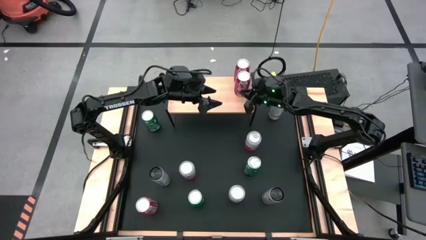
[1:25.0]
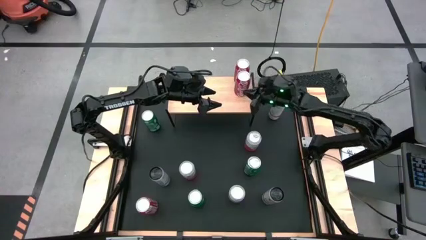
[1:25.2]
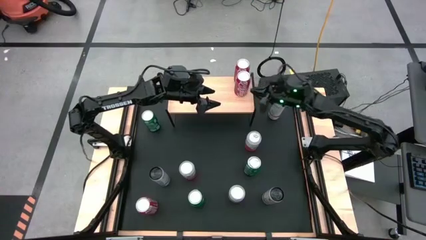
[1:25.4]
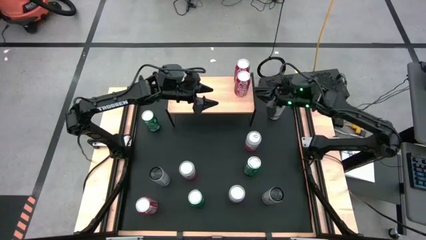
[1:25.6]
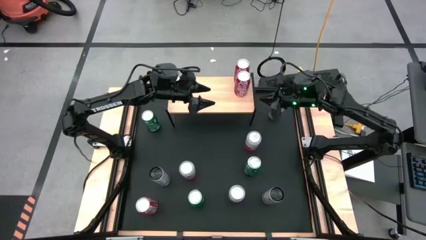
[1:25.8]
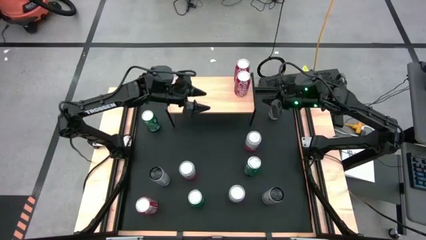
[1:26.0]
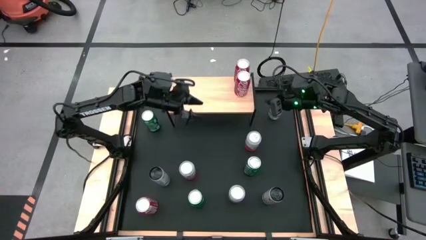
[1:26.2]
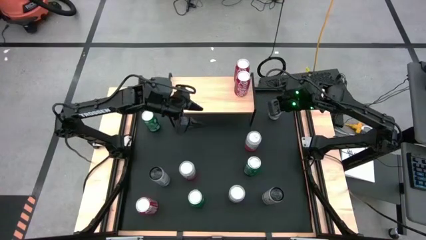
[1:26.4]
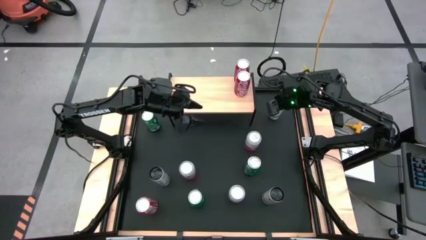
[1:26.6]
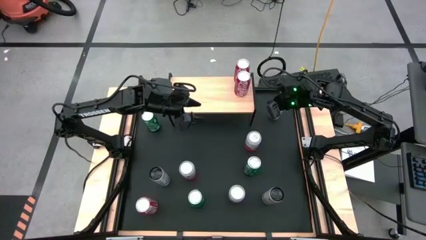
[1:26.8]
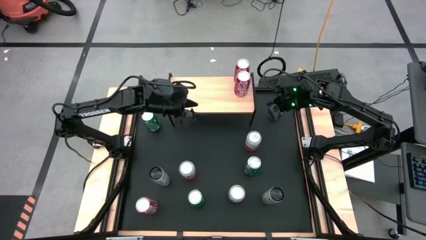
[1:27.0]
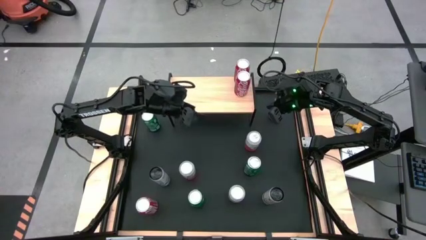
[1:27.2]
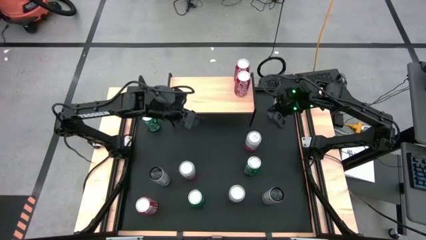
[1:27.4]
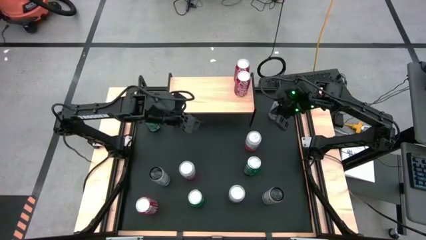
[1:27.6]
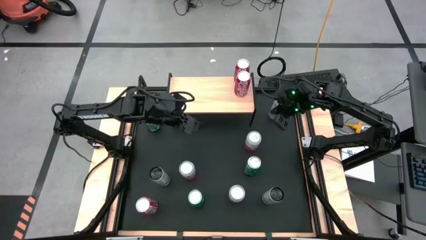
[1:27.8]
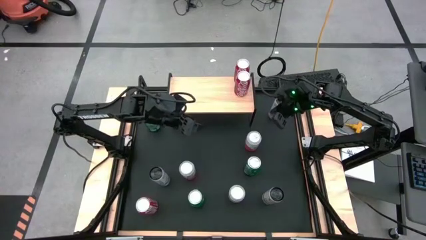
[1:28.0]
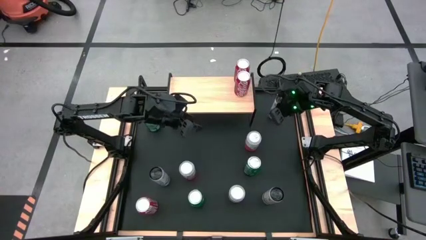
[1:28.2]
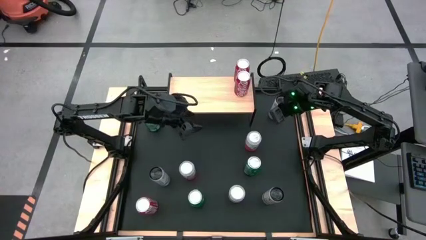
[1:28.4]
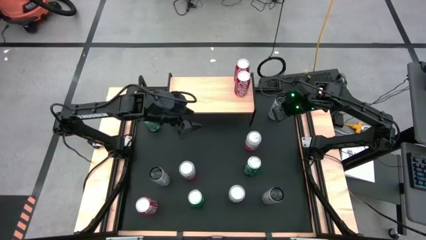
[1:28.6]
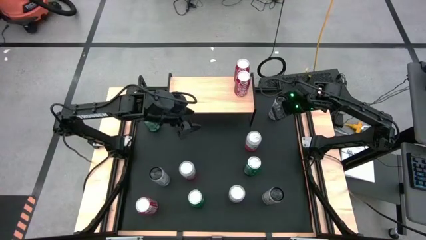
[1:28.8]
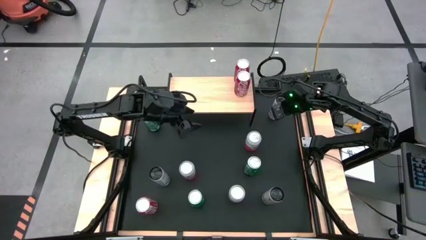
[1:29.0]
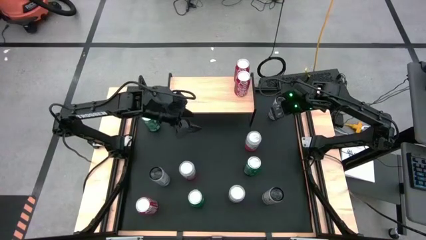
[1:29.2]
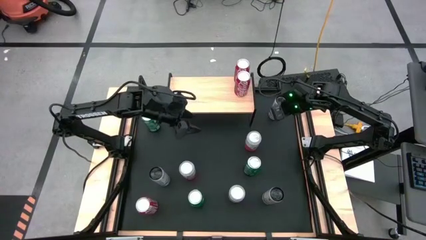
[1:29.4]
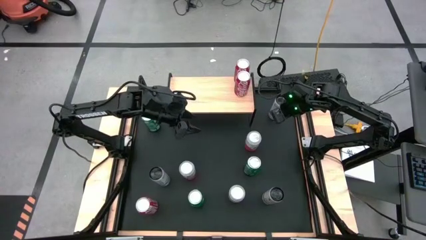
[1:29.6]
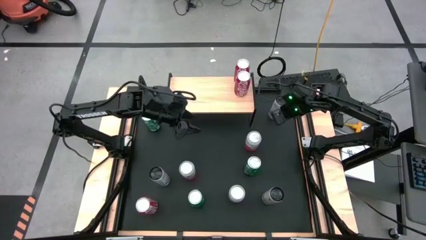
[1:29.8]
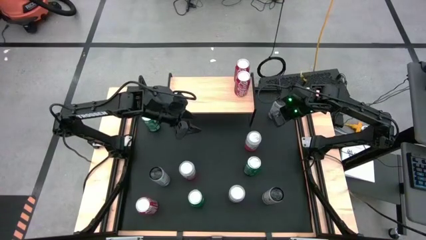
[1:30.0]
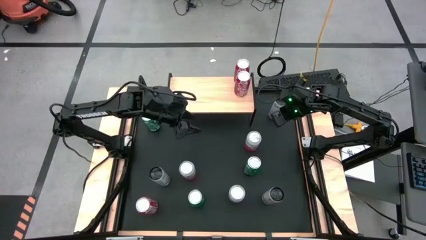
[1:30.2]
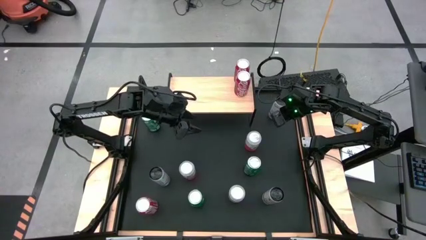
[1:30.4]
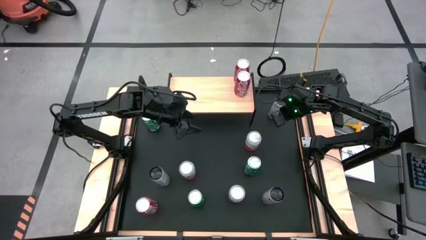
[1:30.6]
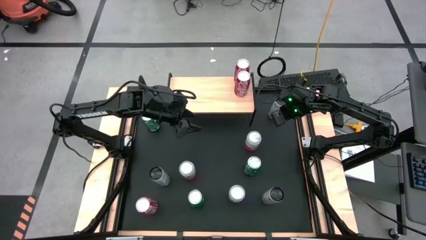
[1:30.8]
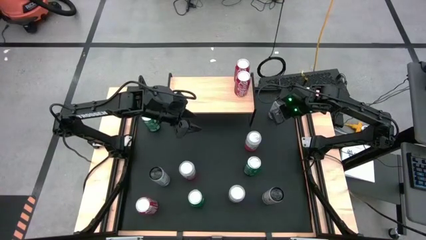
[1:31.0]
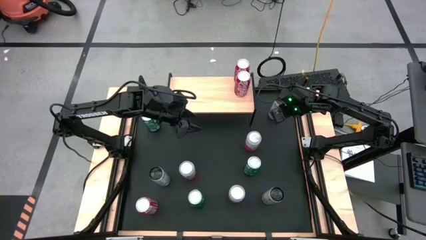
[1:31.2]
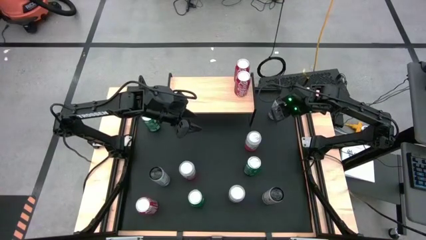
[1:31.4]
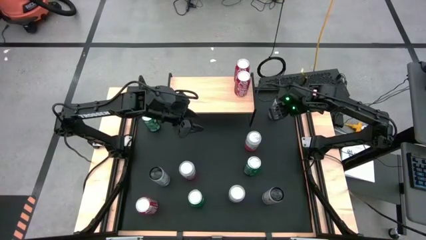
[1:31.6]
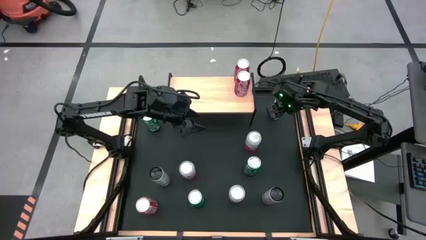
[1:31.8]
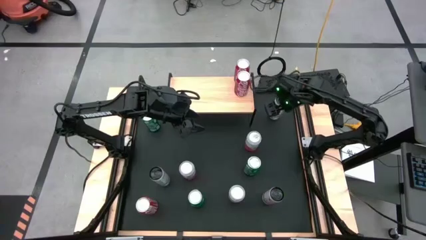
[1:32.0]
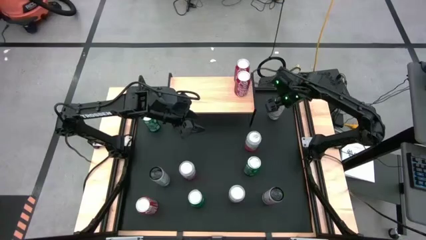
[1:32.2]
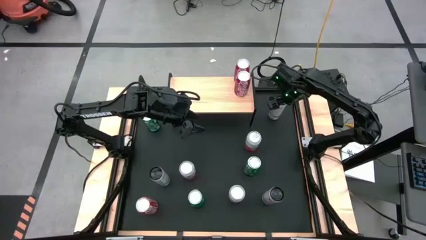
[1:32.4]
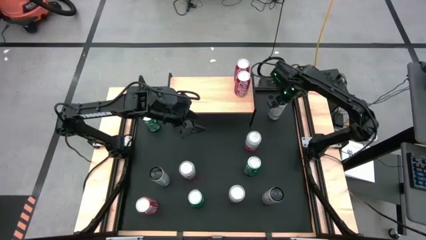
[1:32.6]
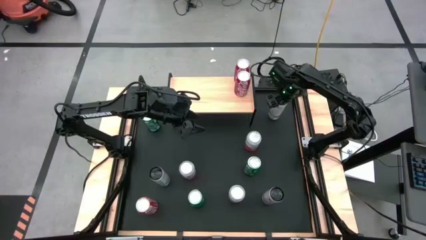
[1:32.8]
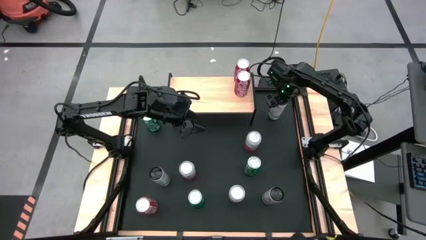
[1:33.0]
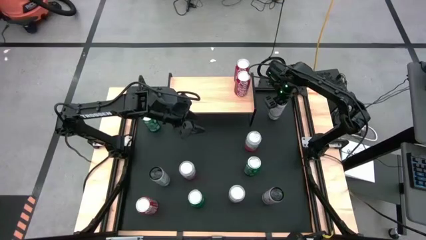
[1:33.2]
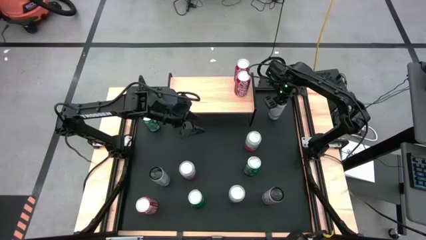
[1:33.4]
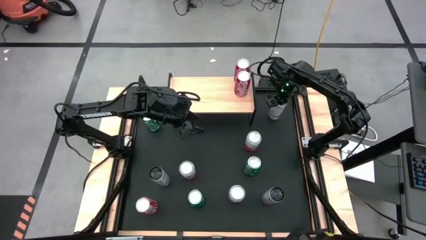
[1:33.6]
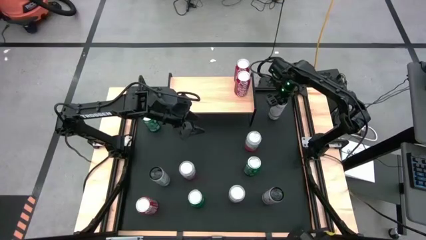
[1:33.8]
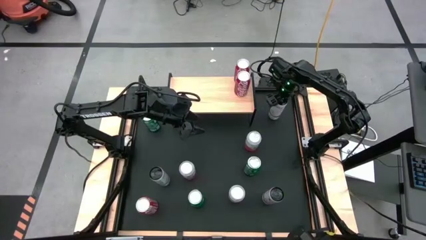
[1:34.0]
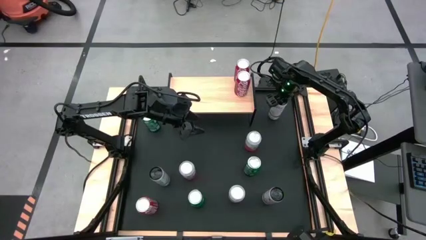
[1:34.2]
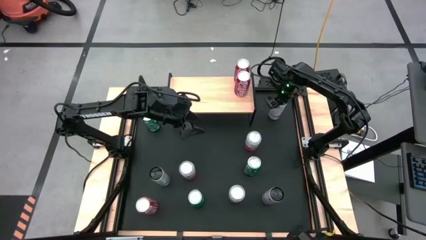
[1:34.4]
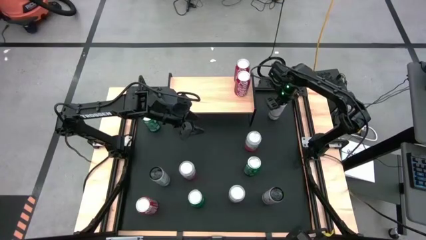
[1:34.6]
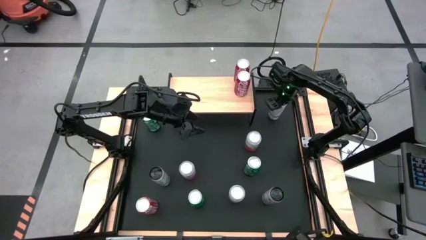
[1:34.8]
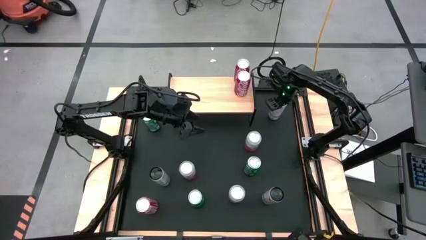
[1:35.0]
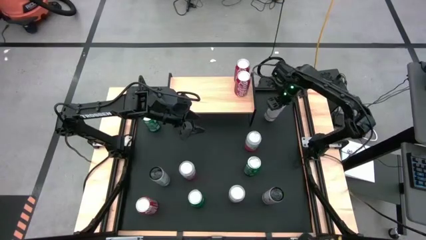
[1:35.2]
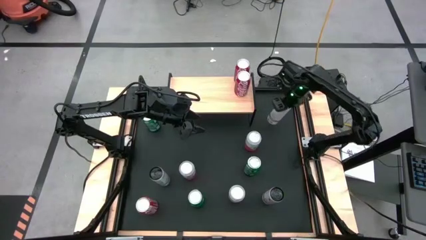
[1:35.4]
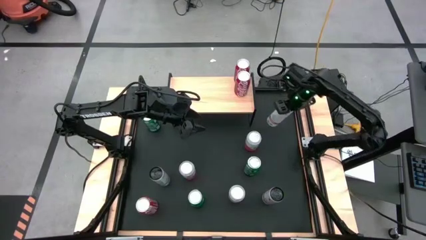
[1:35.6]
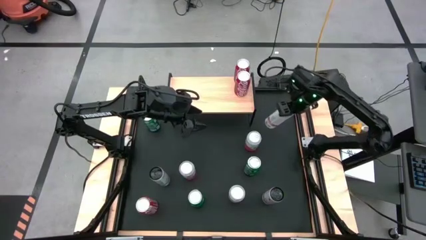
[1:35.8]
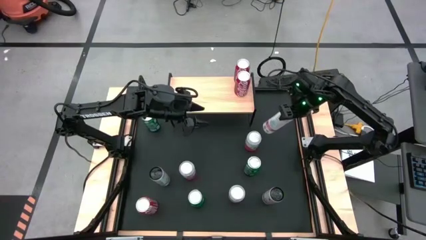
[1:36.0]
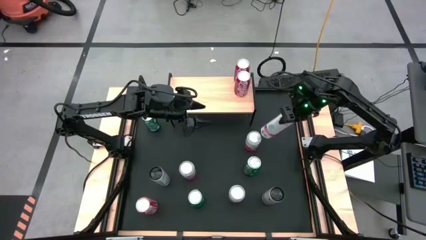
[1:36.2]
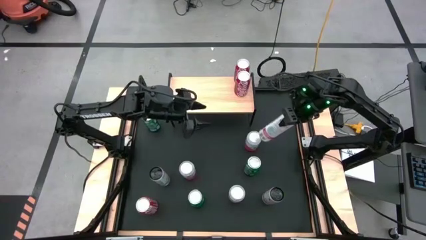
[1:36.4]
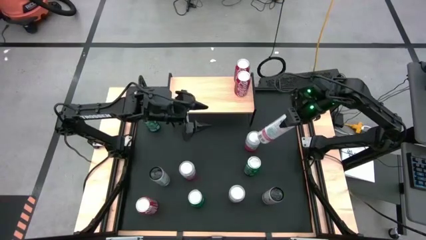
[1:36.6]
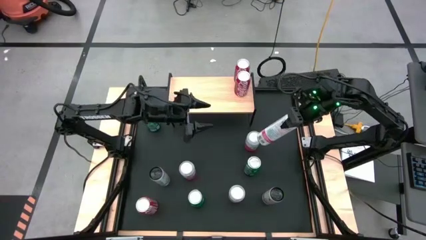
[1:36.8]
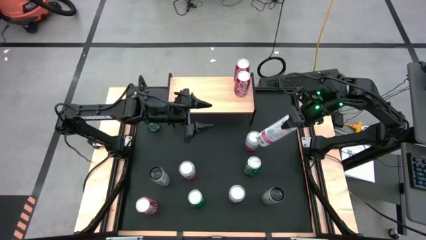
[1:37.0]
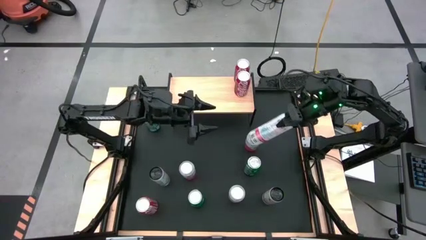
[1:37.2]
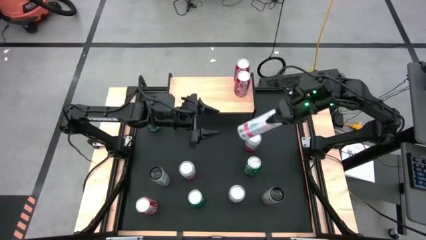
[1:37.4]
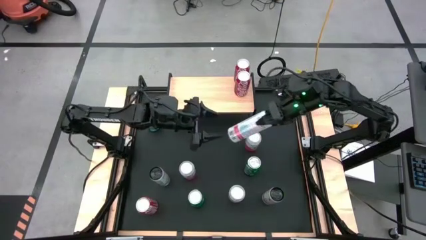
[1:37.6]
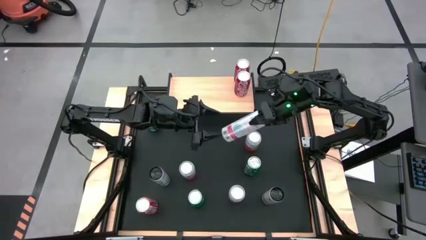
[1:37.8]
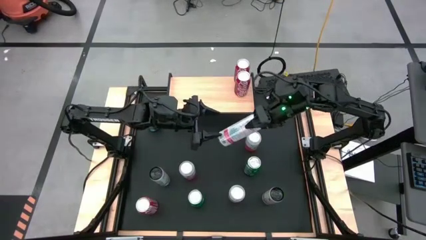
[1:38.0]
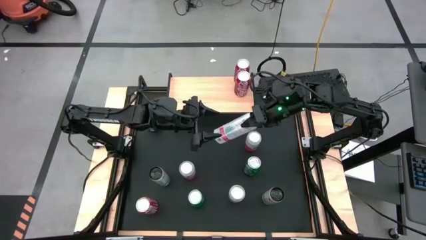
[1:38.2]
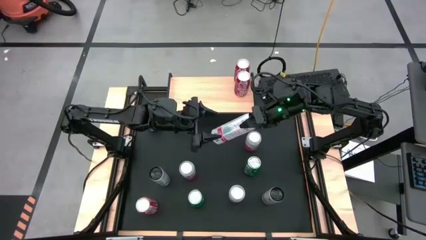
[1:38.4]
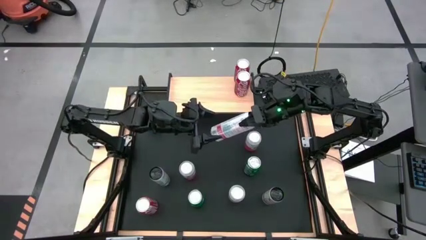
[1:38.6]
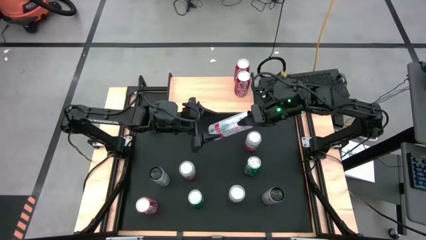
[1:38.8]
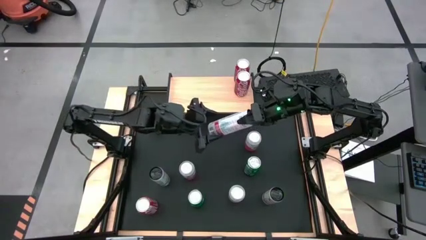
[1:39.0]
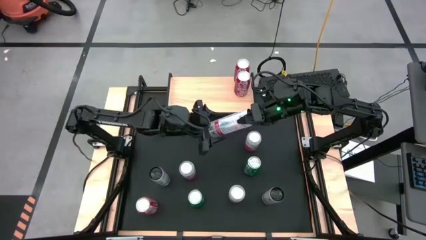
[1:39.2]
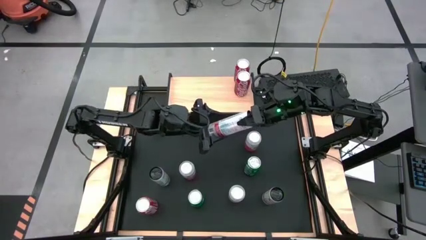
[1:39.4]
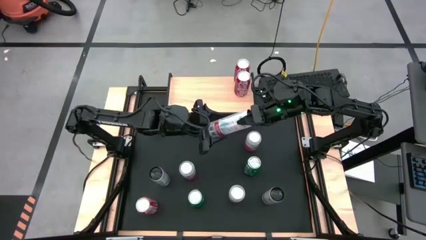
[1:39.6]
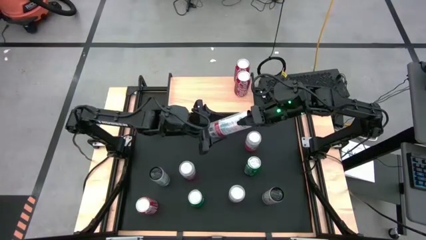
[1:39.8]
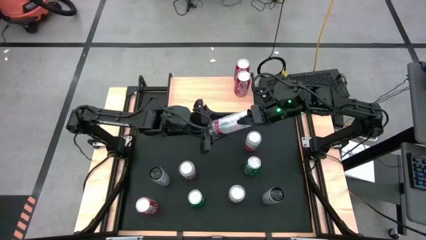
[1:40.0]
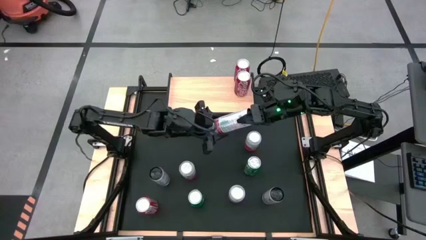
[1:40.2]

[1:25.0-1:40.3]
Task: Place canned beverage on shelf
Put the top white pink soda can on the shelf
